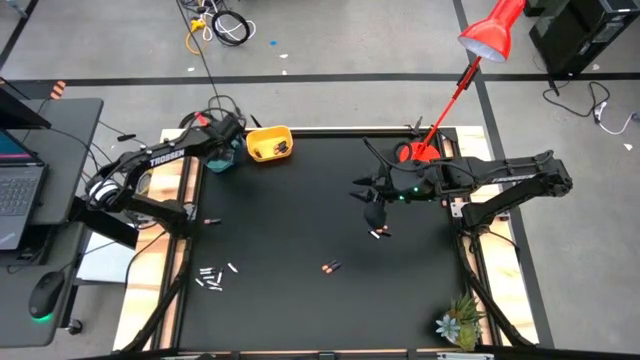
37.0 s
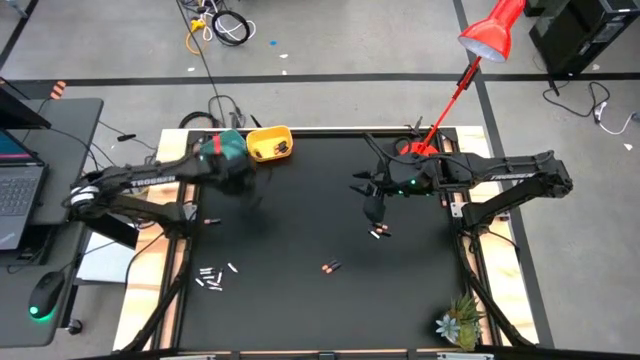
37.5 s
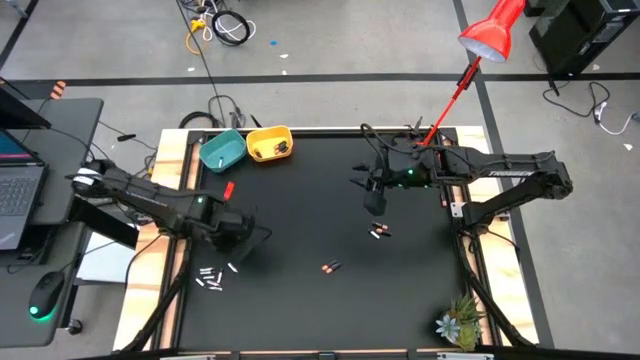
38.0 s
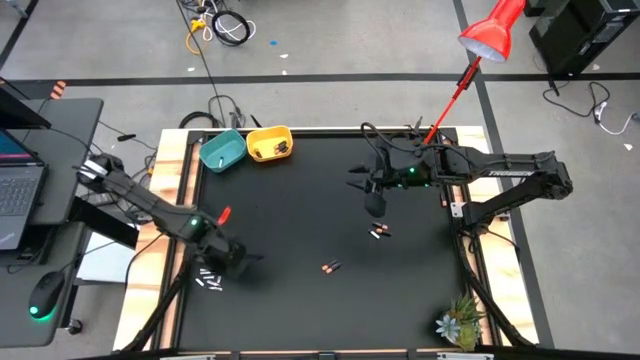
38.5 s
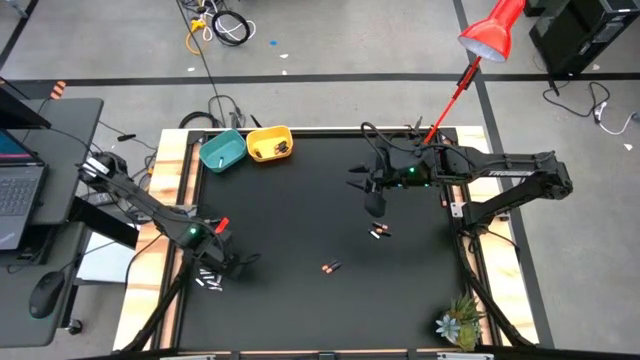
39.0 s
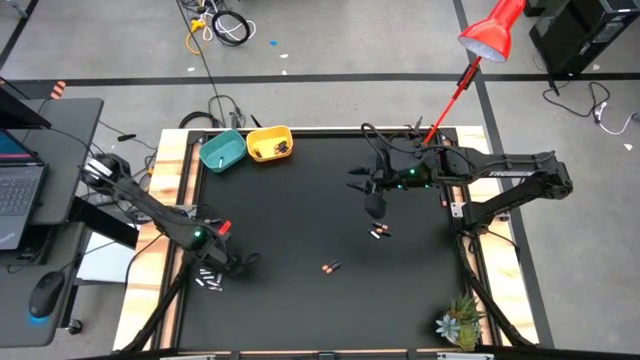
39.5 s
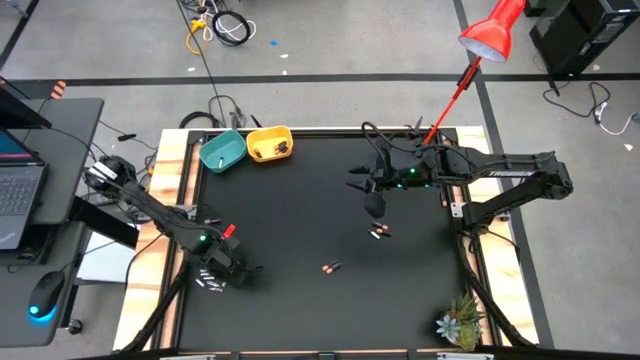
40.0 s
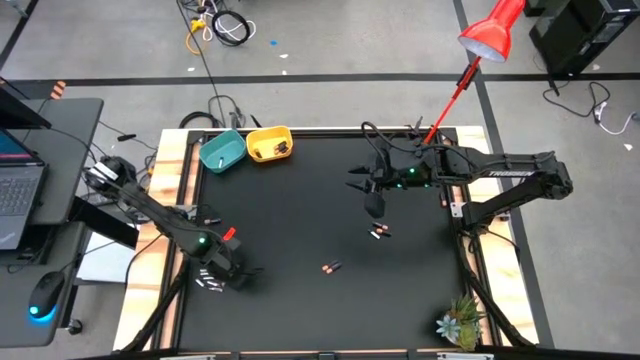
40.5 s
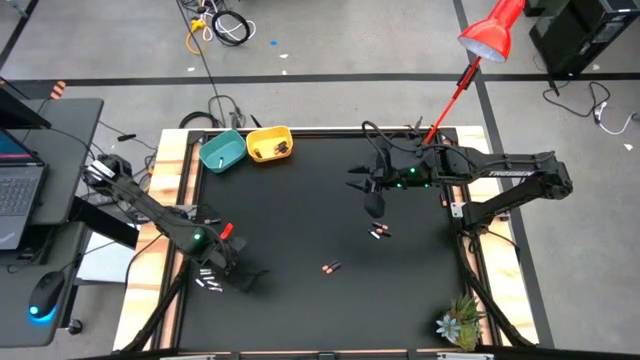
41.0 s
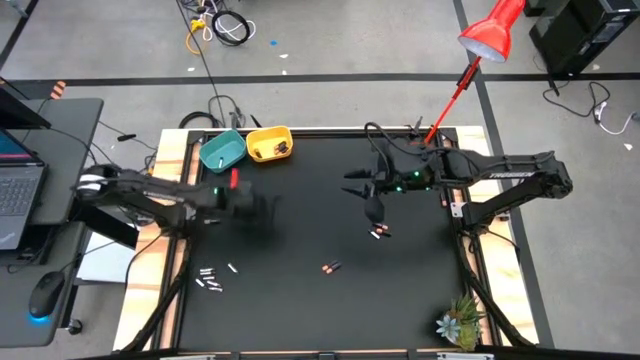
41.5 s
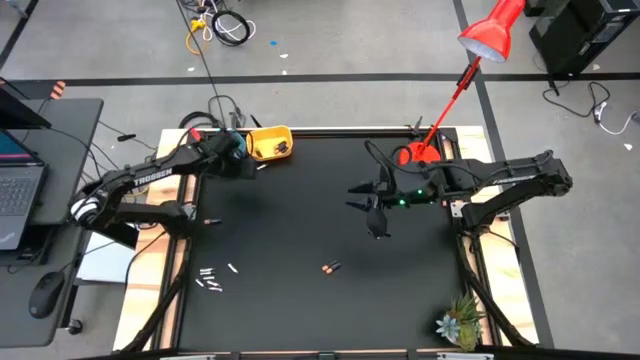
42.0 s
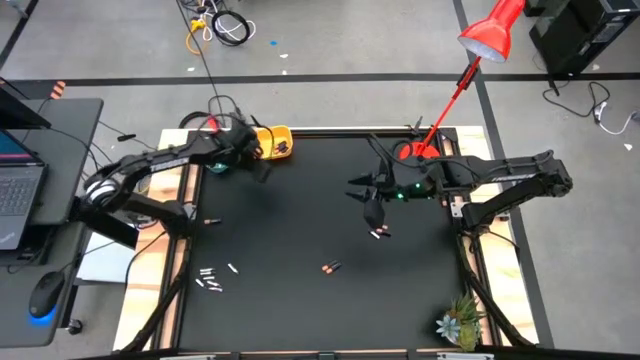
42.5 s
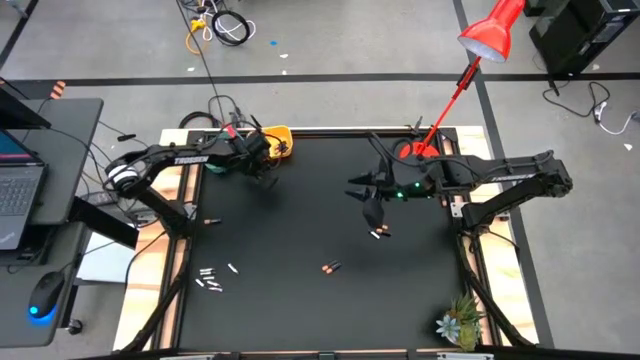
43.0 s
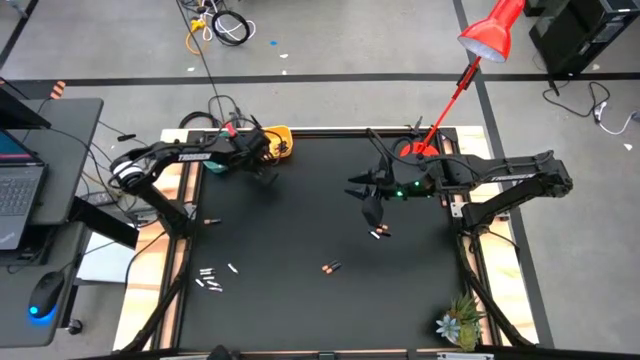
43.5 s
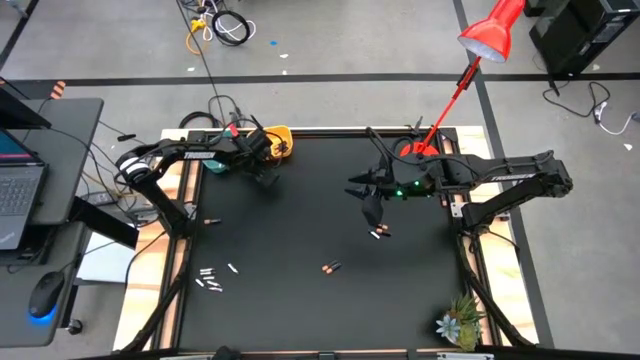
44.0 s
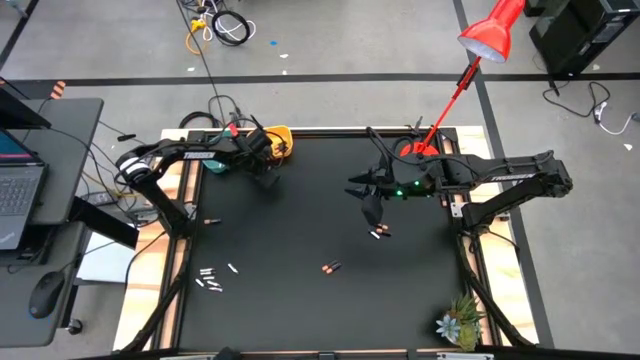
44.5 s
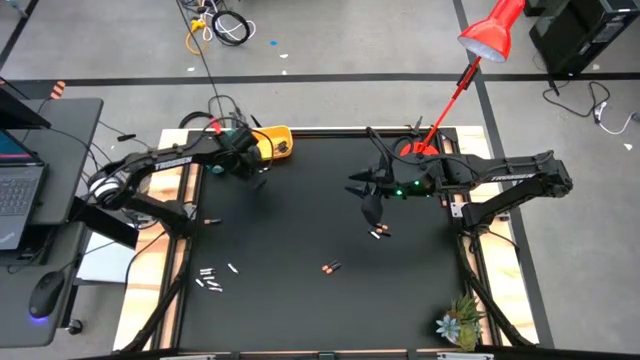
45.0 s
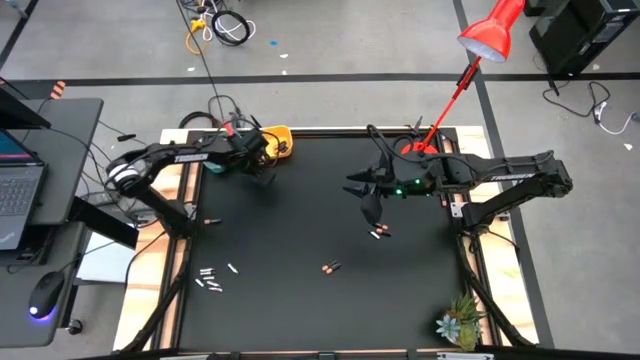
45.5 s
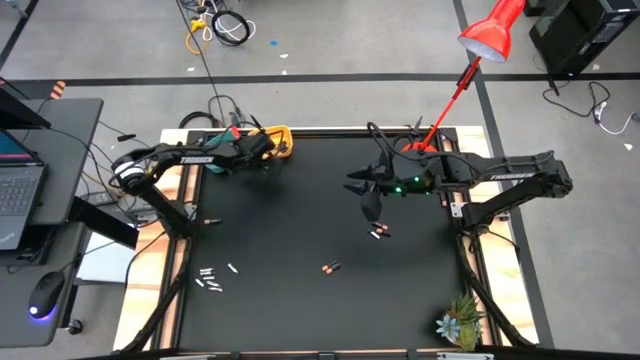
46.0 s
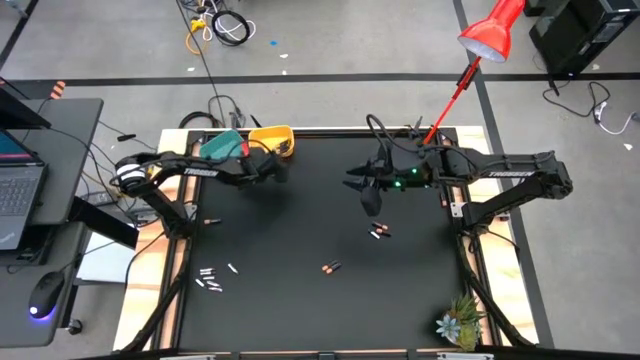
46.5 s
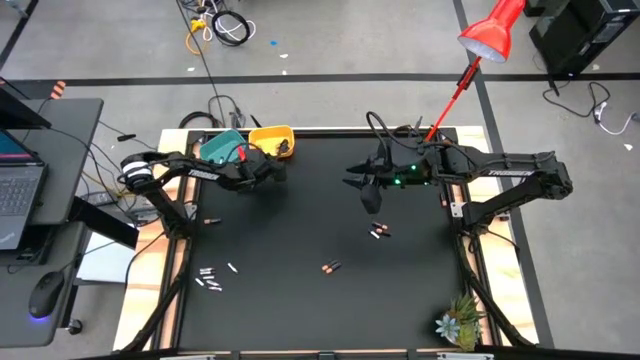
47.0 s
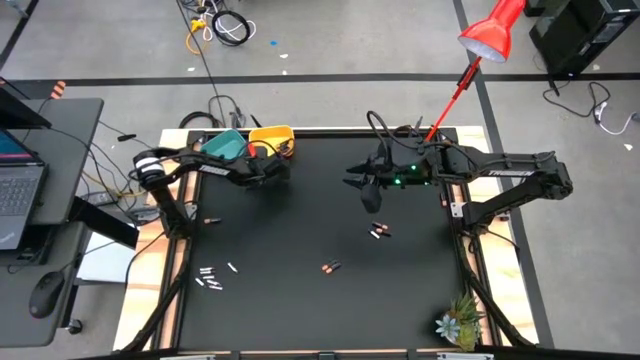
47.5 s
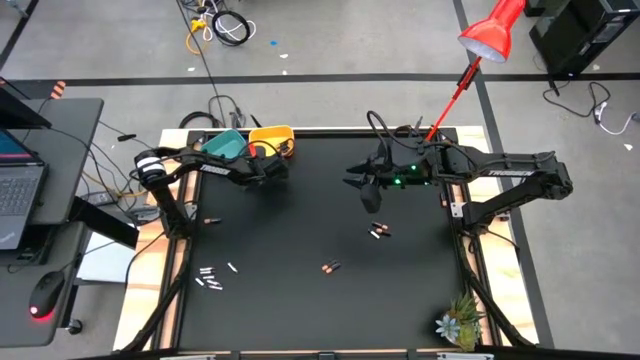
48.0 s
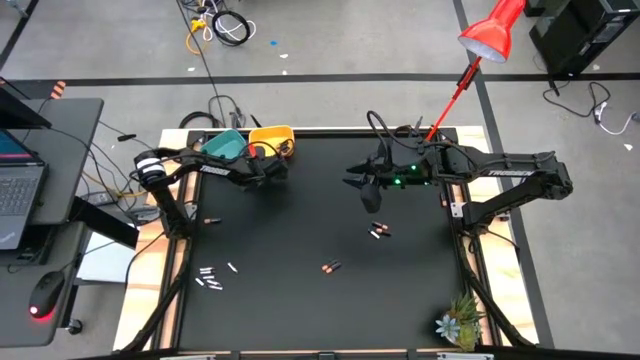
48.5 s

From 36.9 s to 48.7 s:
Task: Sort batteries
Put the silver battery into the blue bin

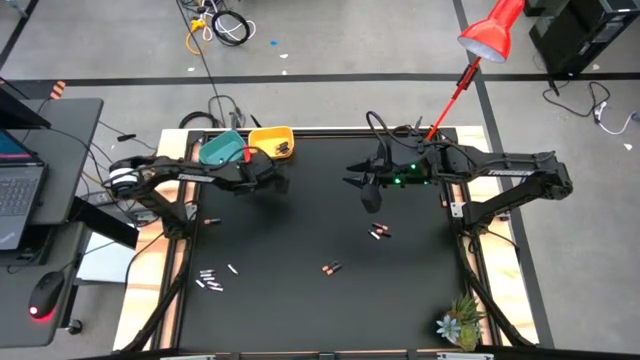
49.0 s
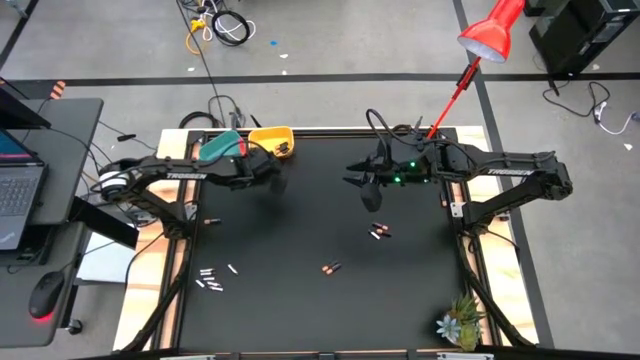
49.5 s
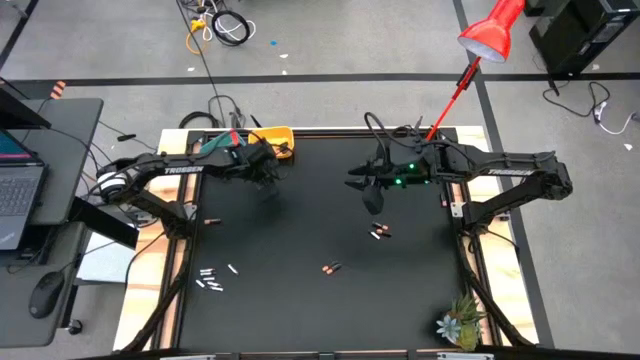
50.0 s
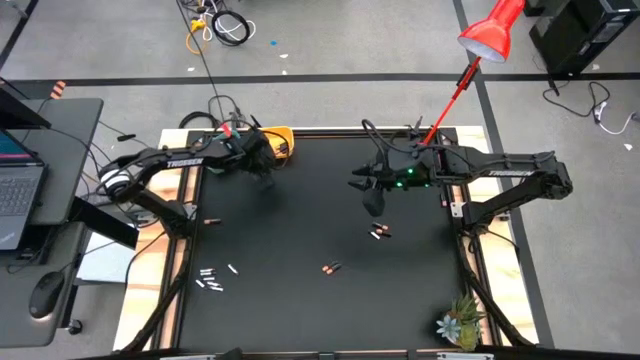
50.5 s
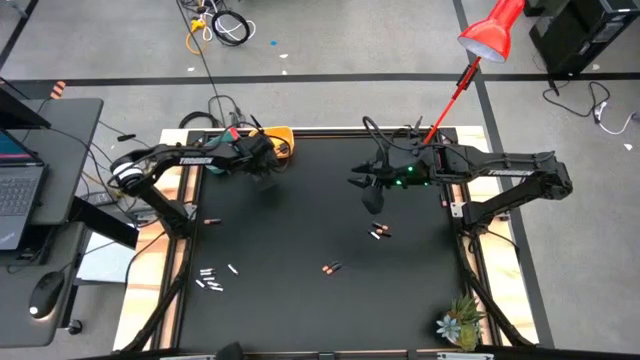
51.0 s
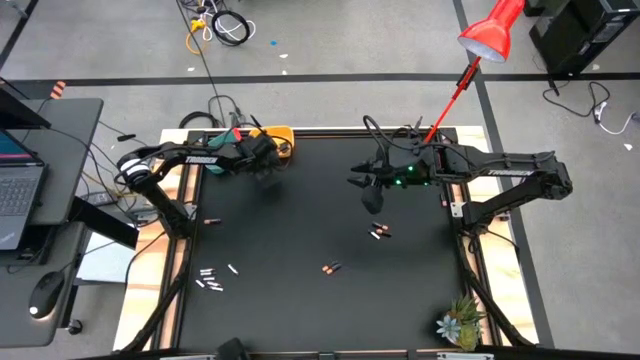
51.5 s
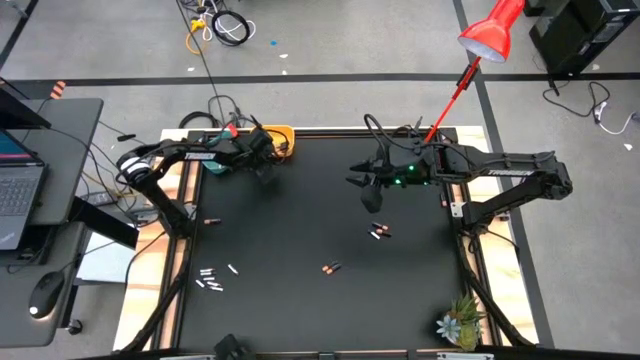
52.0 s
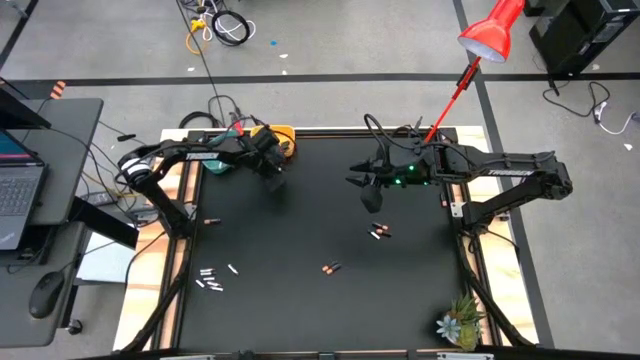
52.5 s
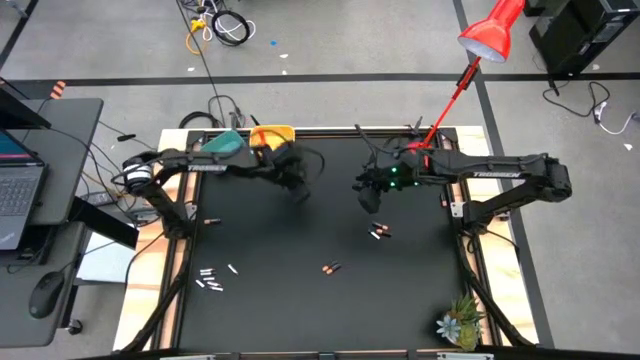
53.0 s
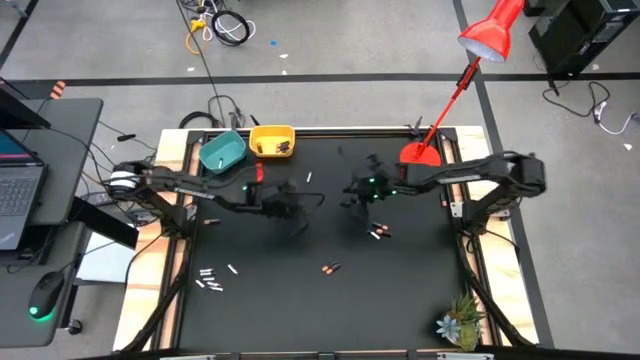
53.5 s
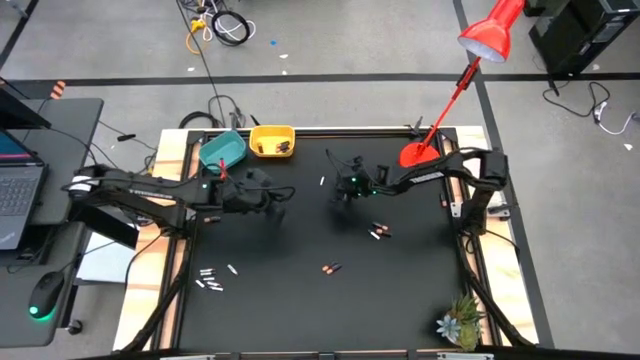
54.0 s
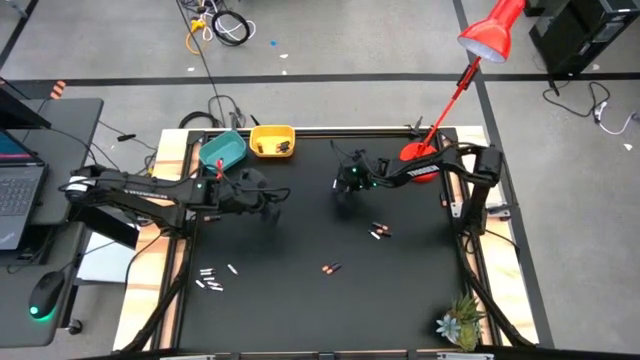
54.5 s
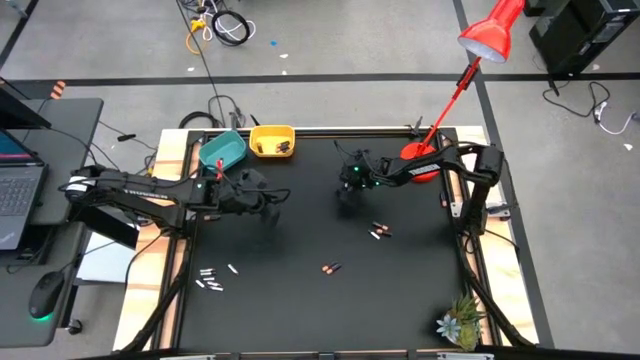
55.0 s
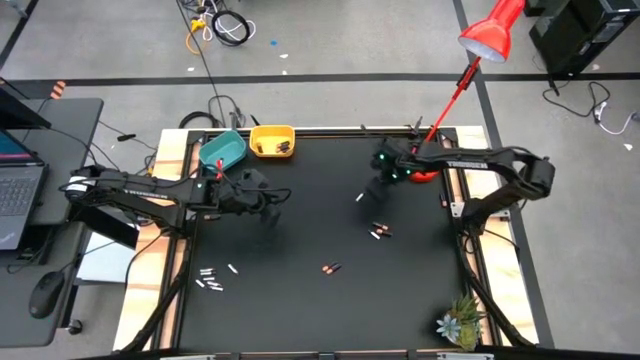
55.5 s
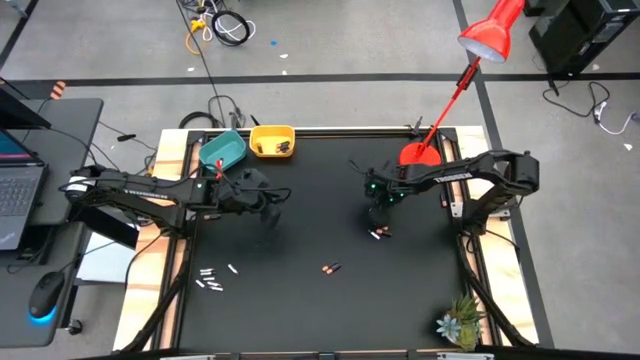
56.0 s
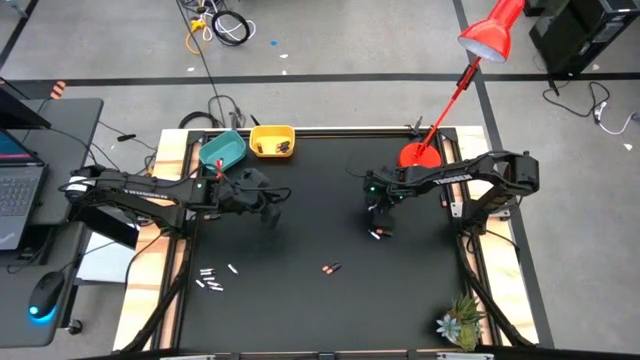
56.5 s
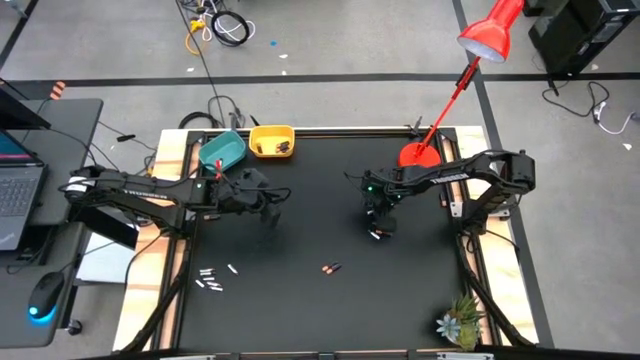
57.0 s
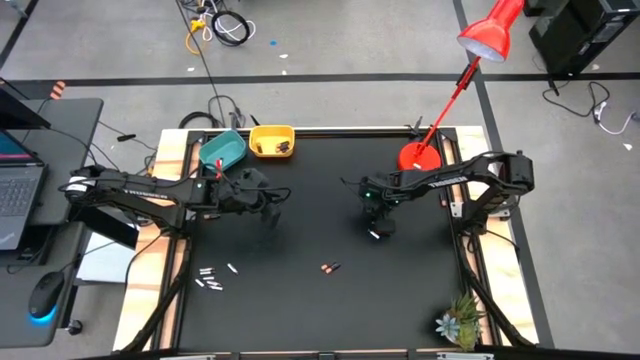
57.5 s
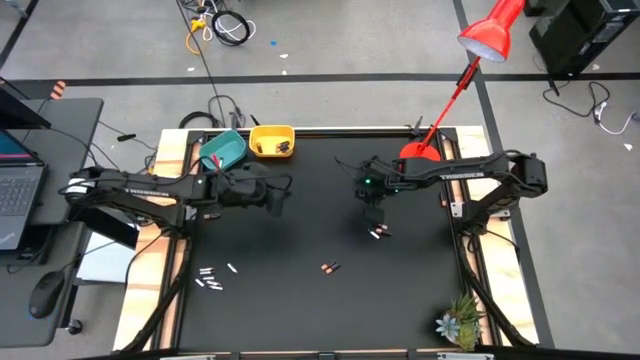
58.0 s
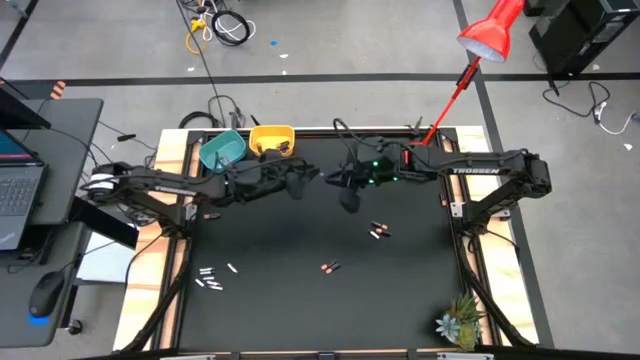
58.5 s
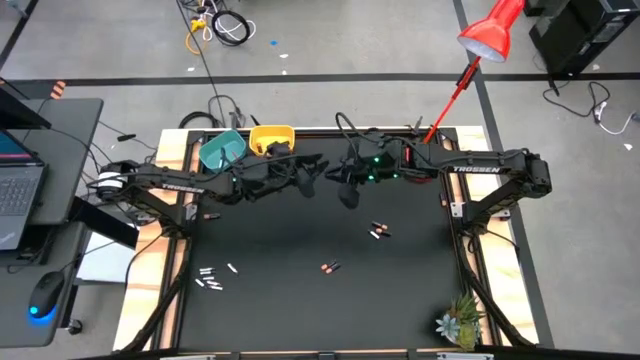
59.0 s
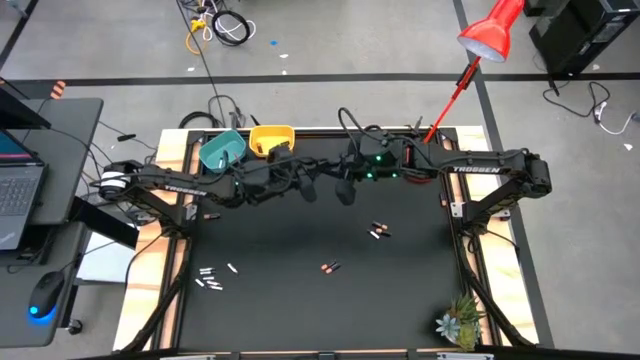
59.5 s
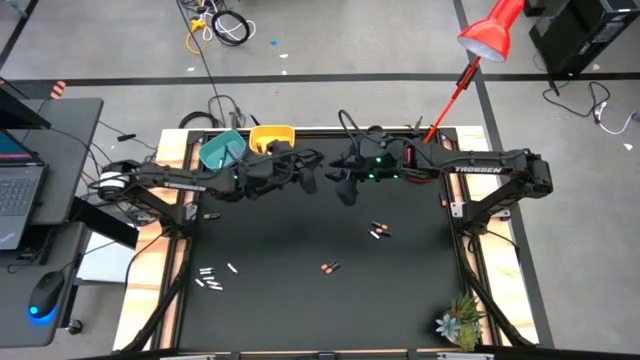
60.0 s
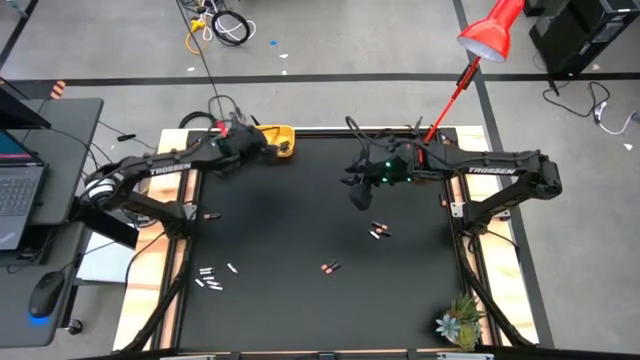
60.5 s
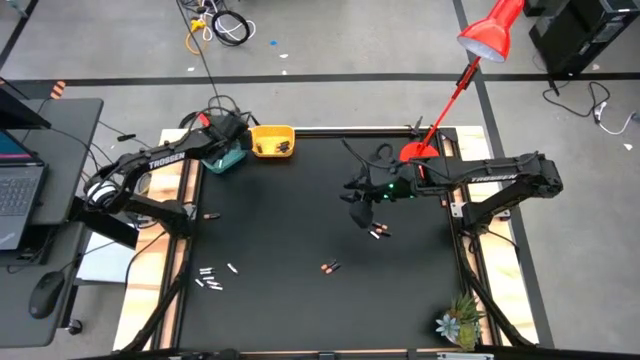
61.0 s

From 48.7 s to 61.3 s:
Put the silver battery into the blue bin
